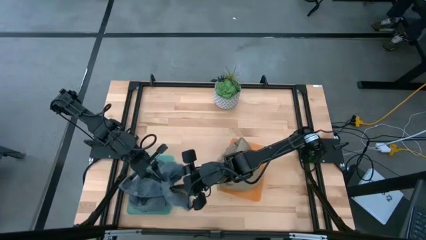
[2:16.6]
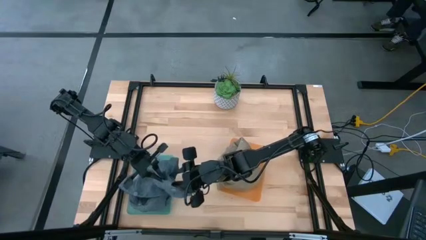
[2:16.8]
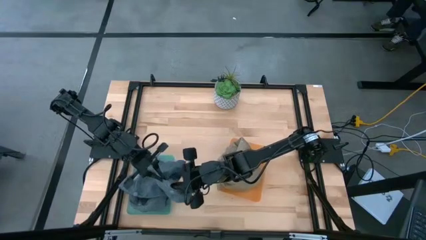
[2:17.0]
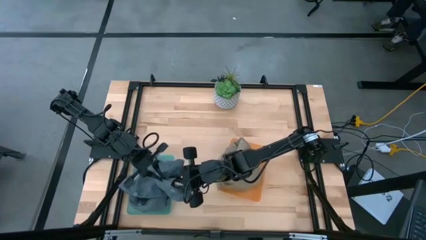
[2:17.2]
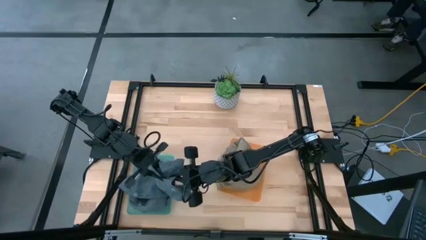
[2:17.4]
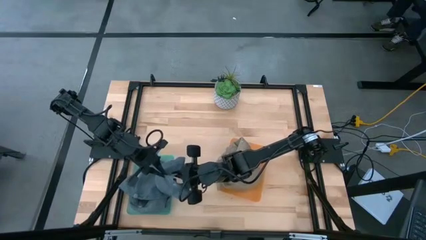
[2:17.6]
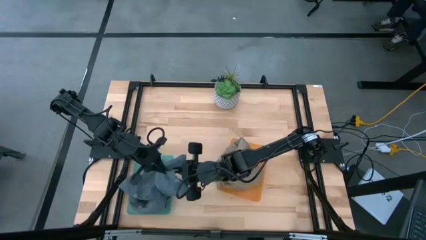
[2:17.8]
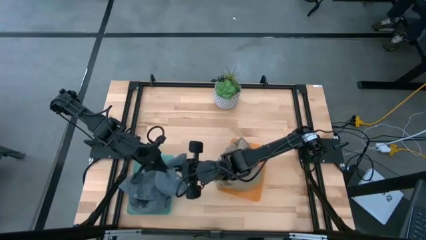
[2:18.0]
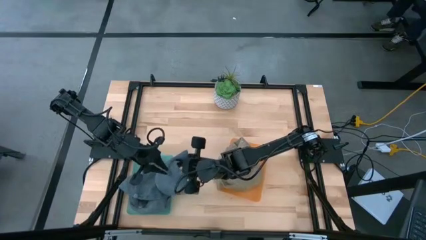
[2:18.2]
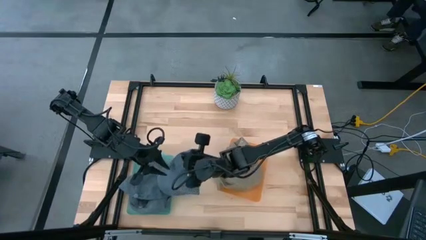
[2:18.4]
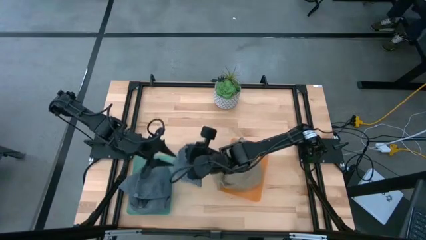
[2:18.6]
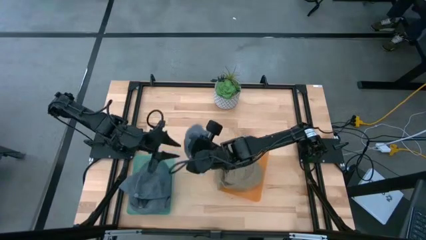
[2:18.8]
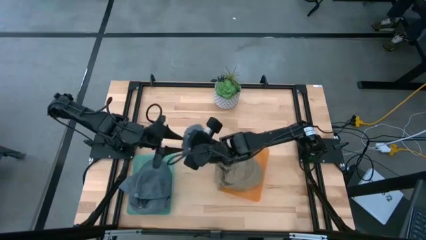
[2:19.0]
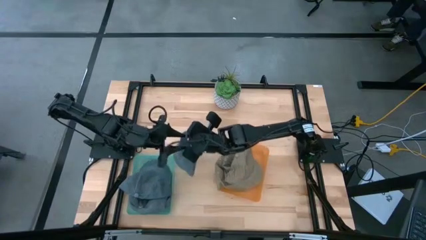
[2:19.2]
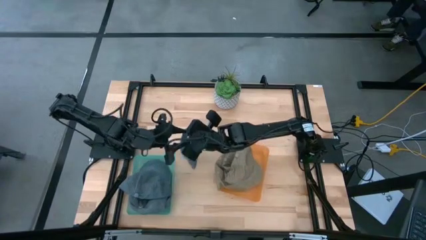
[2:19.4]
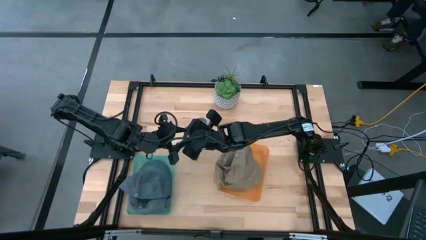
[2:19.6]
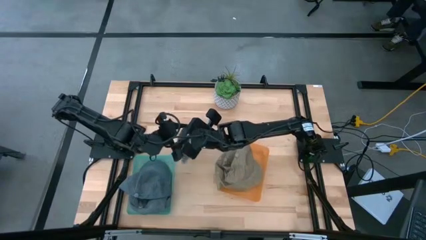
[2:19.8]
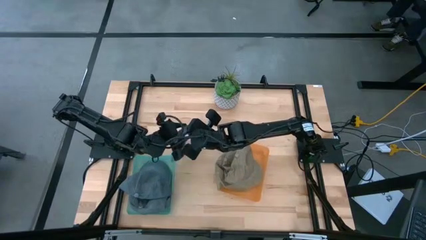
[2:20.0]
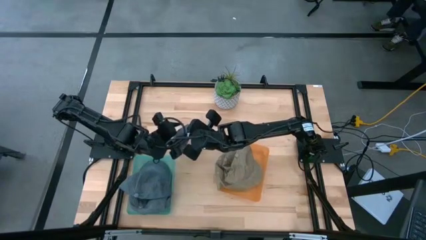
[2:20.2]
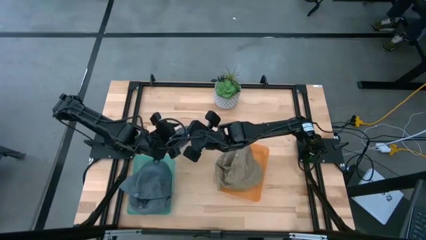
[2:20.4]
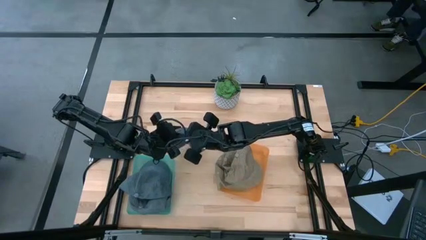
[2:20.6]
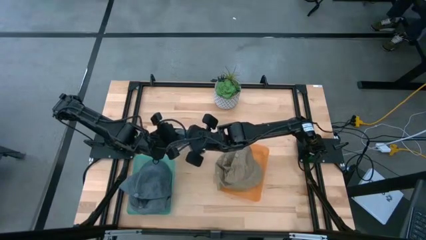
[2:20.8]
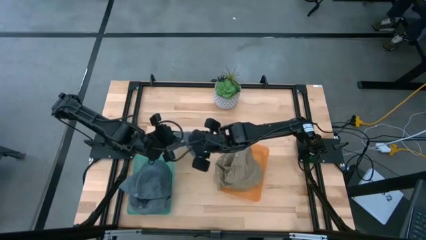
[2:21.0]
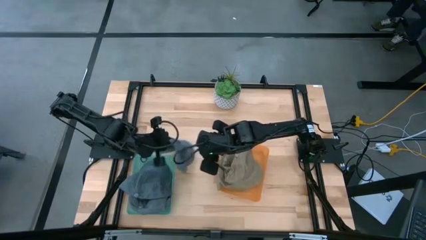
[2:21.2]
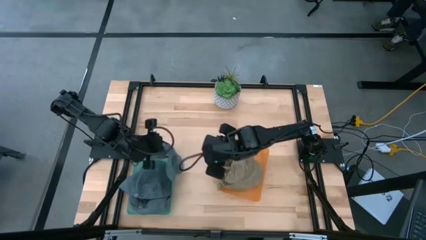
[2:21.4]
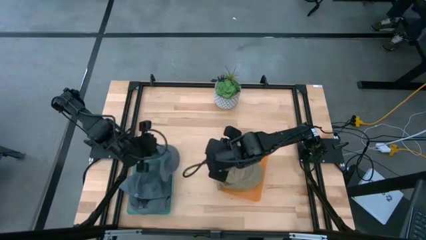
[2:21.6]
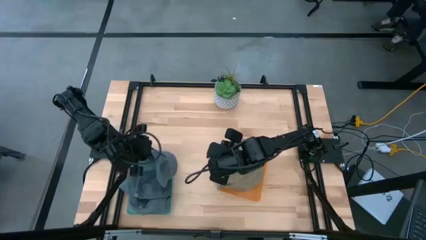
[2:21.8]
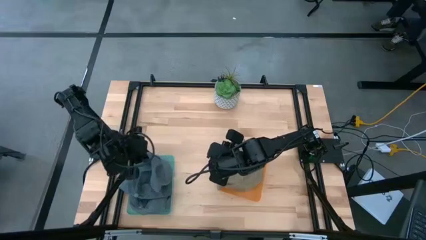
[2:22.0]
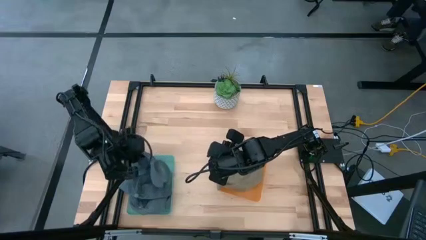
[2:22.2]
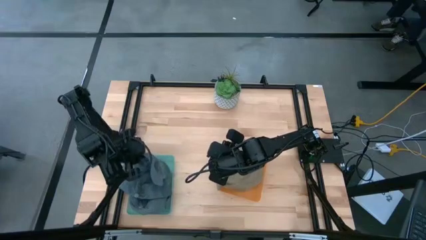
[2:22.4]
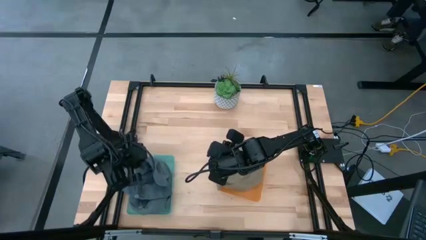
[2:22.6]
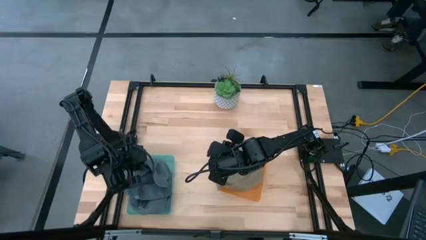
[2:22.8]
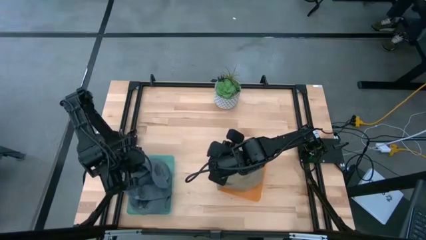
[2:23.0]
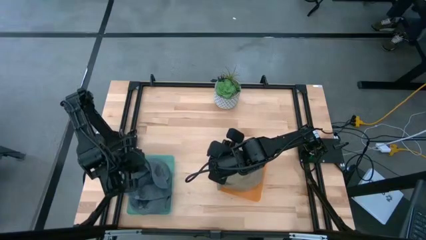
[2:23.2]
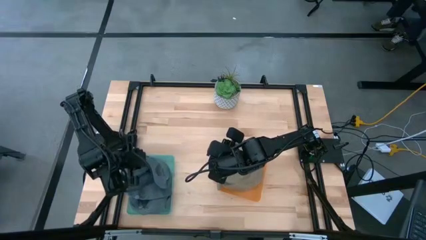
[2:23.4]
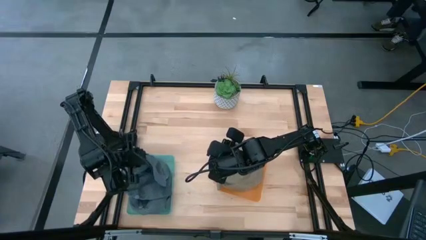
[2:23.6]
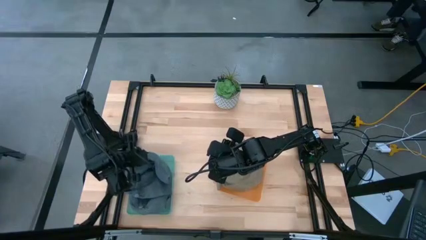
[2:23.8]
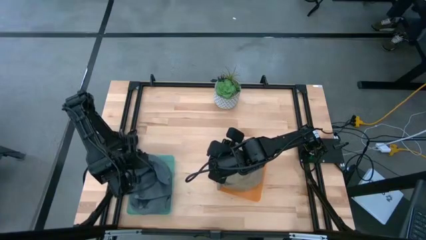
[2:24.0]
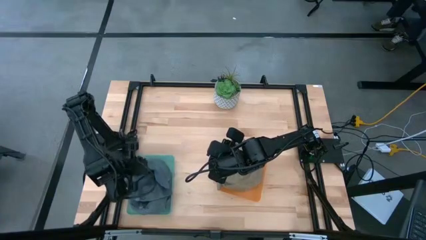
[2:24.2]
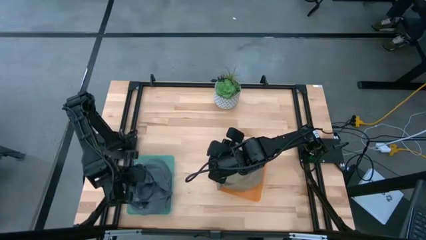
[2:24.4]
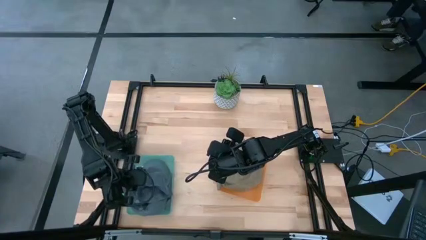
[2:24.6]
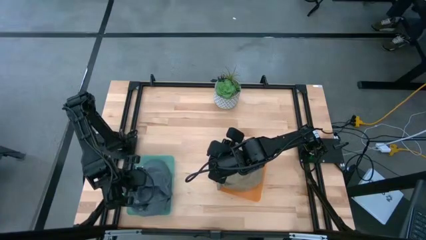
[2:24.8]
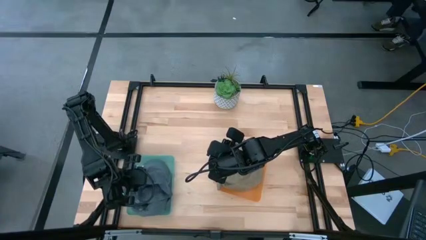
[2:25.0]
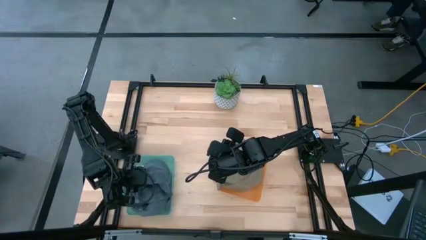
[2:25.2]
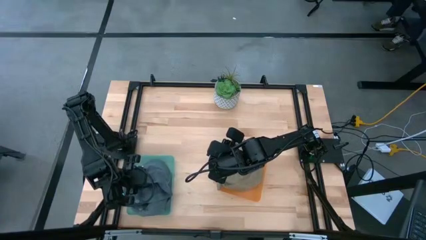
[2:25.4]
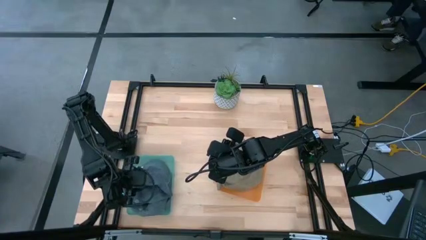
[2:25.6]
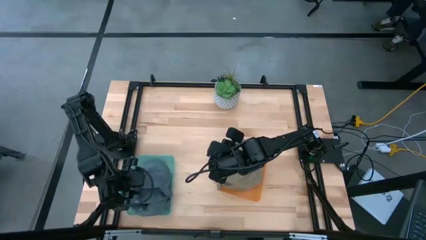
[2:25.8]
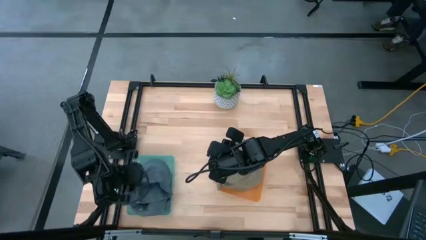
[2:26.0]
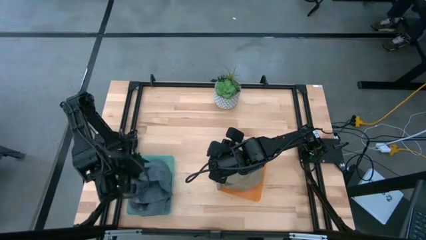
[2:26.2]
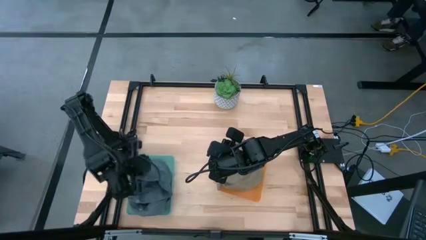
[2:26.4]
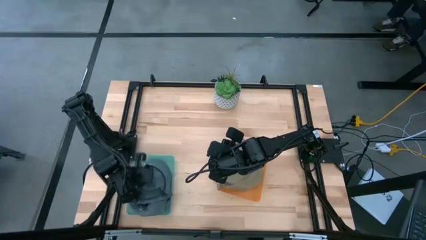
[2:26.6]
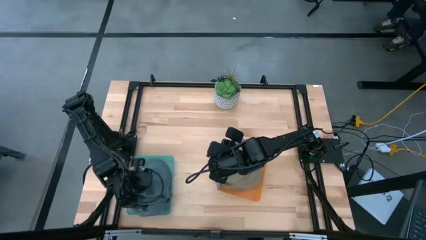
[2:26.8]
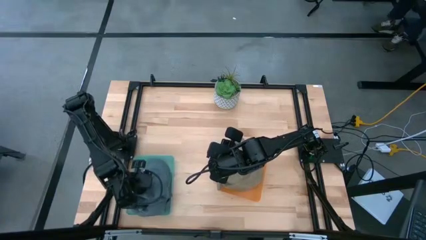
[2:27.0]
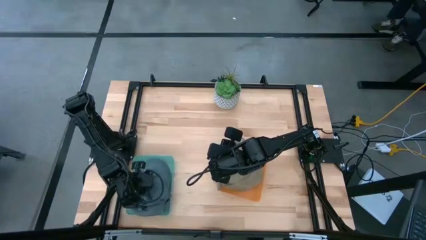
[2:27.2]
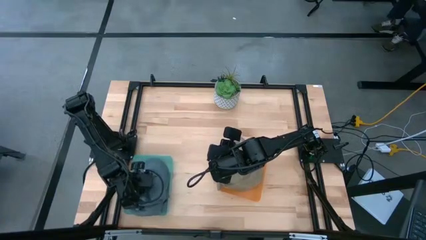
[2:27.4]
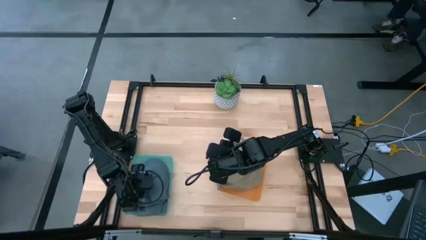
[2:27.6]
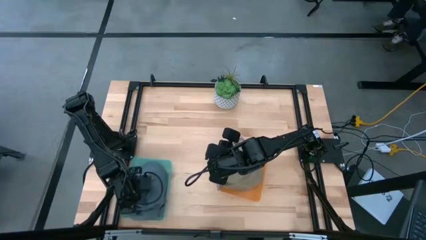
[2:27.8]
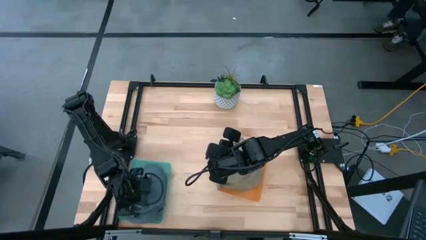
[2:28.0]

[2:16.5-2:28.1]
Task: Pick & Place hat
Put the blue cap into the green bin

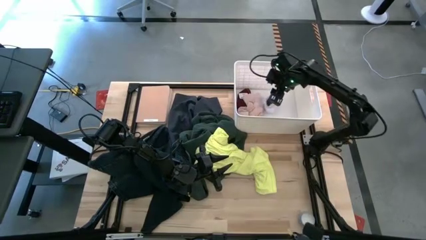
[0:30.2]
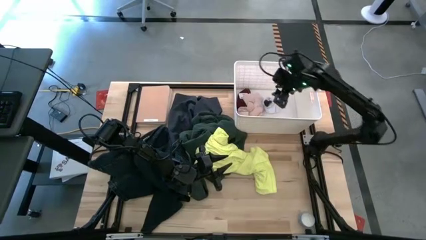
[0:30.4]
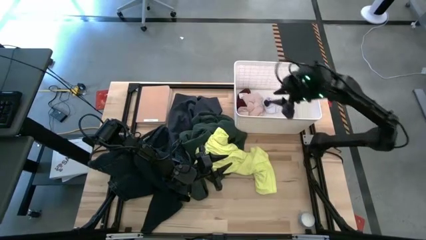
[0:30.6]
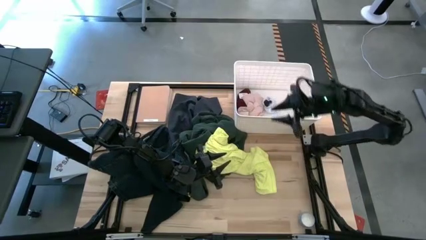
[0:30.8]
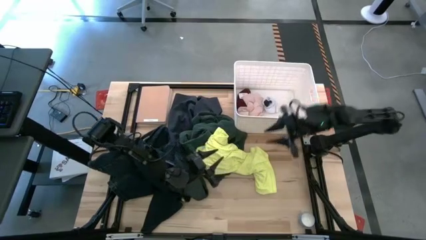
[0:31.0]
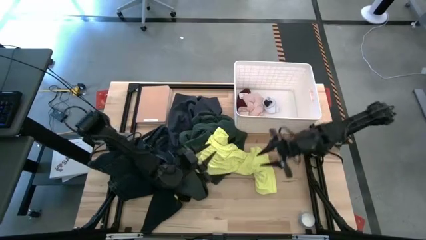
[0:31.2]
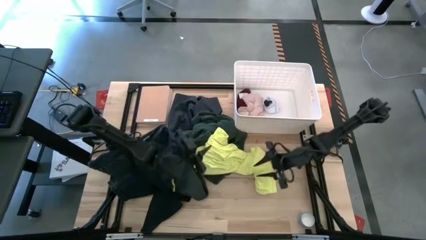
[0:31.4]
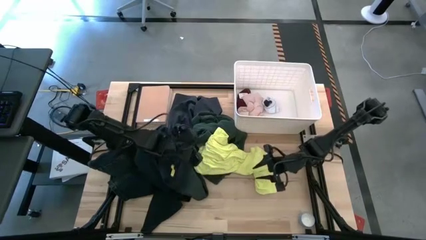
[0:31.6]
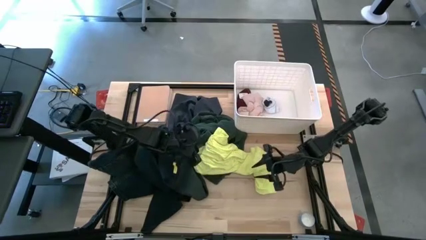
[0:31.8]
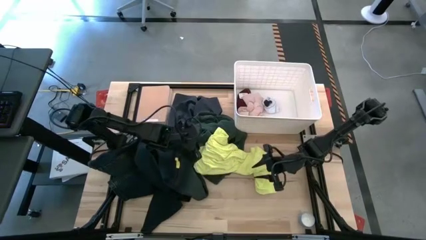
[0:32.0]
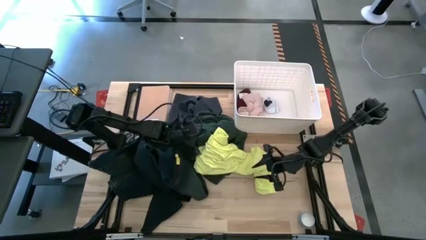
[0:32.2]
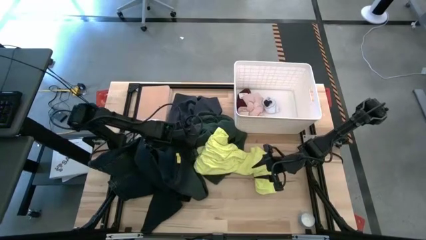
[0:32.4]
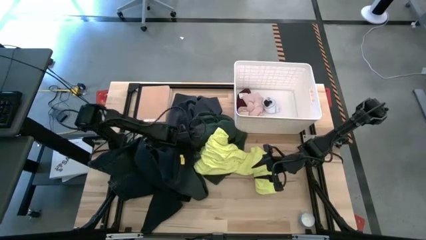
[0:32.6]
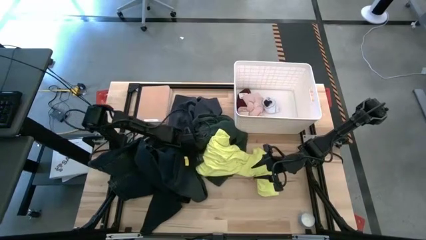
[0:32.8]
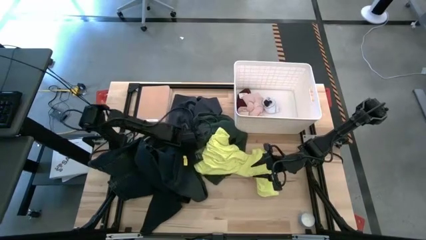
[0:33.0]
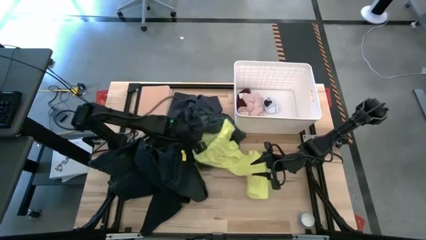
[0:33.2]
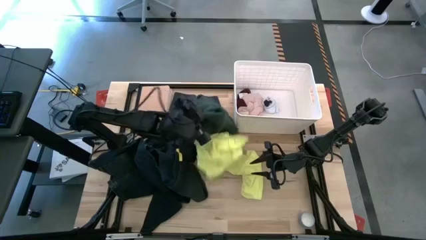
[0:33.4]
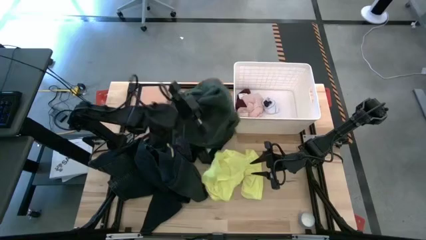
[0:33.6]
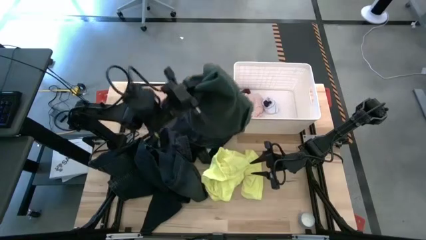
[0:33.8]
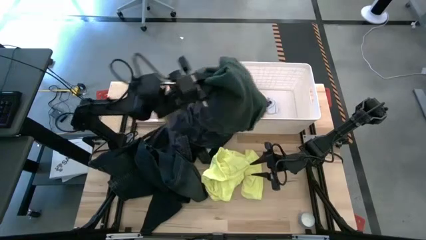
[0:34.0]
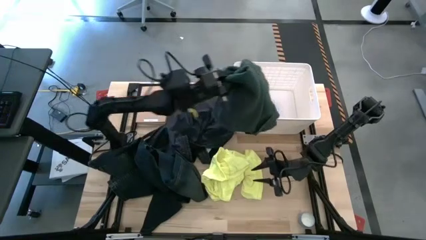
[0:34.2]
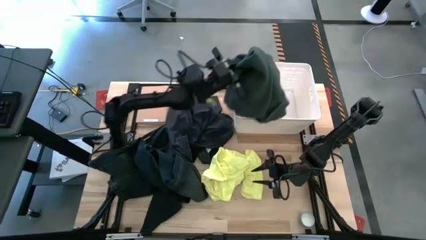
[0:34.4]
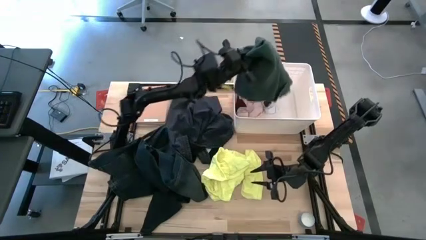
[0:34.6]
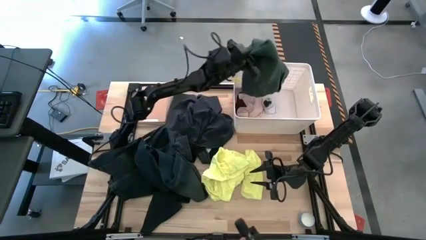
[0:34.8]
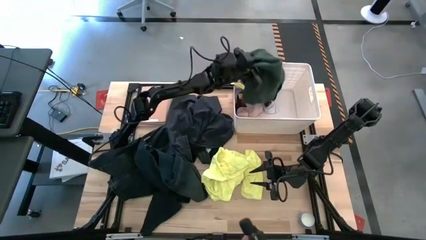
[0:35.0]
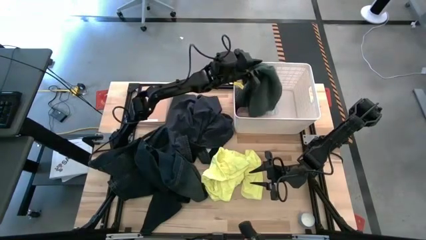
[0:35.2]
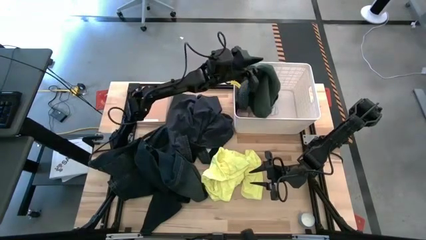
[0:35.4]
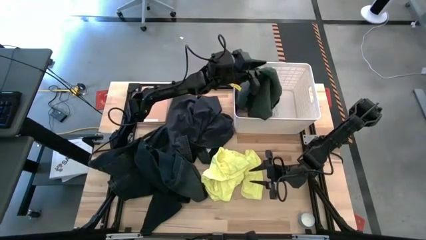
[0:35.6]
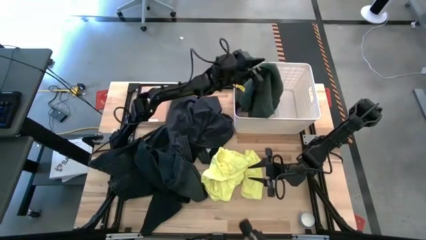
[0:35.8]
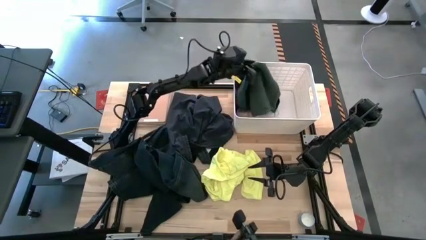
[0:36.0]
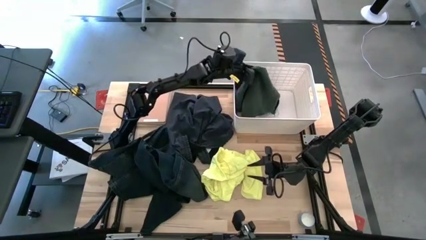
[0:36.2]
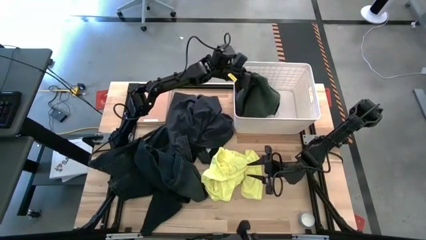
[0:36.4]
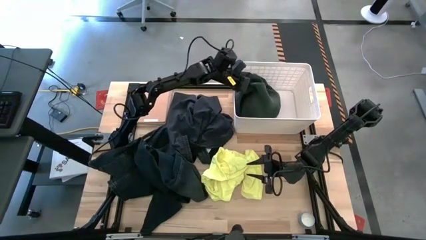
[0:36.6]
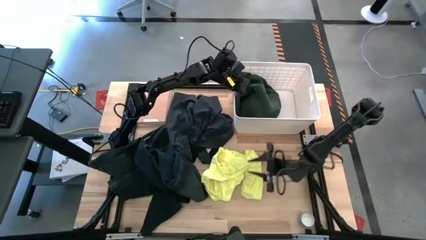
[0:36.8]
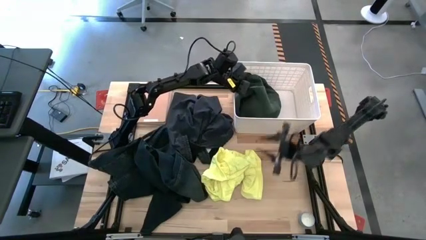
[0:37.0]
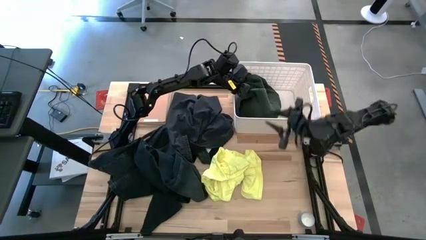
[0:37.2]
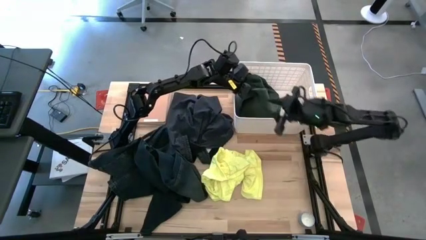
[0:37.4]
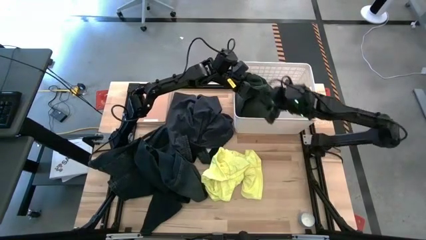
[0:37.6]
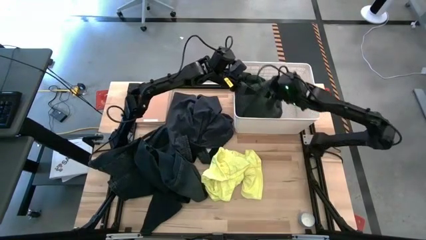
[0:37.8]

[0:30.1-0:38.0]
Task: Sort clothes
Put the green sweater into the white laundry bin
